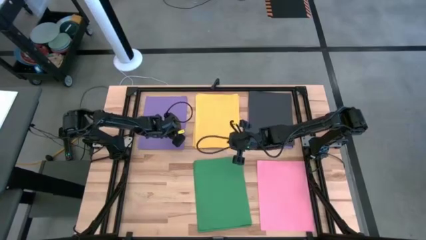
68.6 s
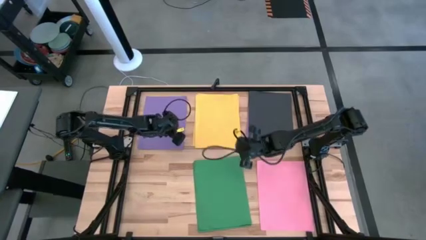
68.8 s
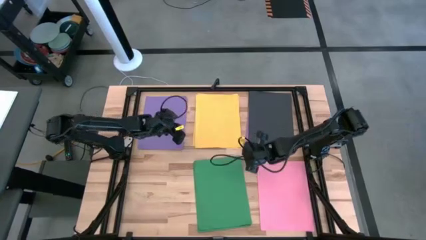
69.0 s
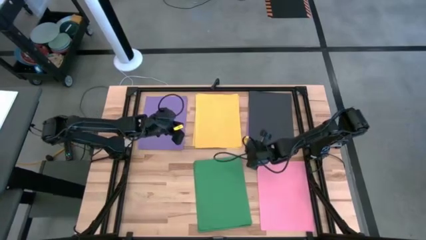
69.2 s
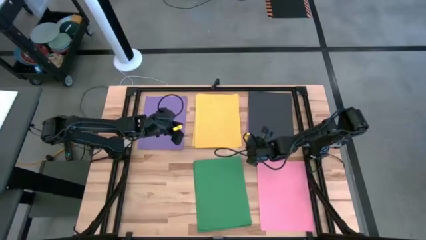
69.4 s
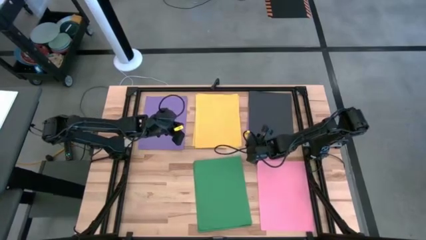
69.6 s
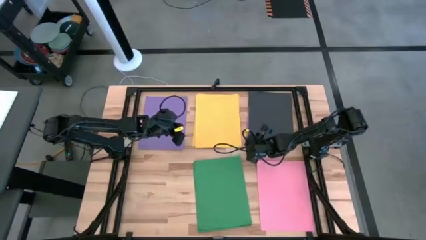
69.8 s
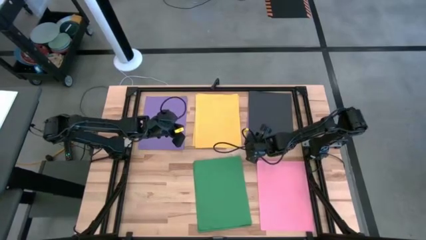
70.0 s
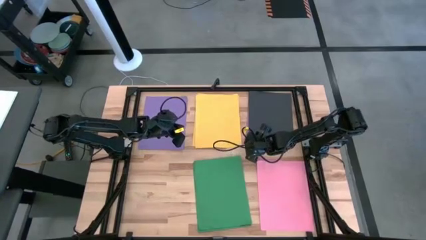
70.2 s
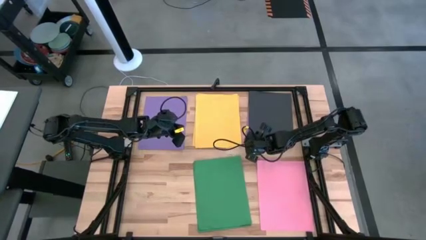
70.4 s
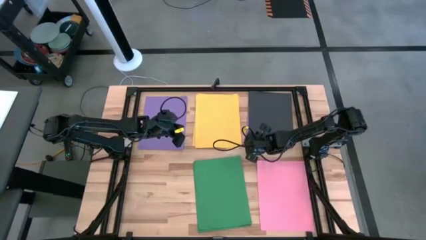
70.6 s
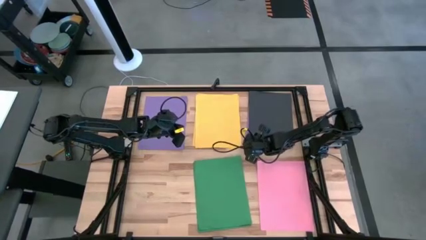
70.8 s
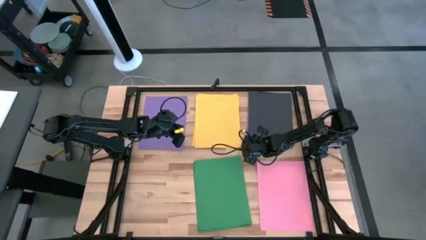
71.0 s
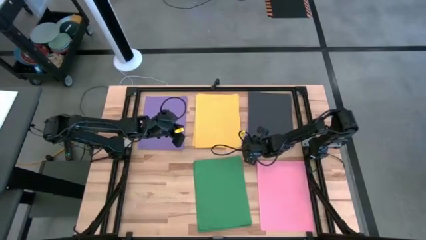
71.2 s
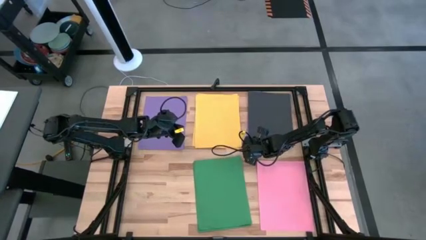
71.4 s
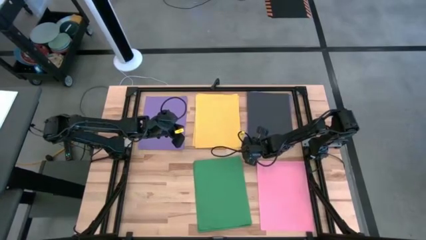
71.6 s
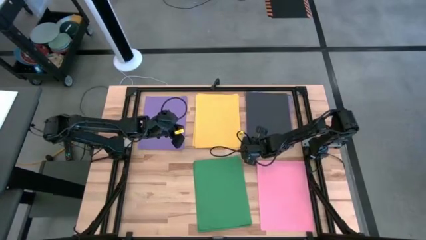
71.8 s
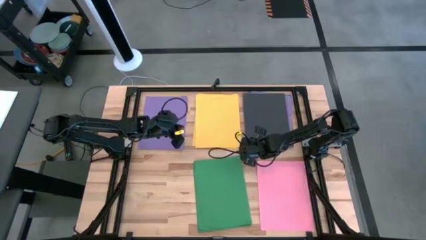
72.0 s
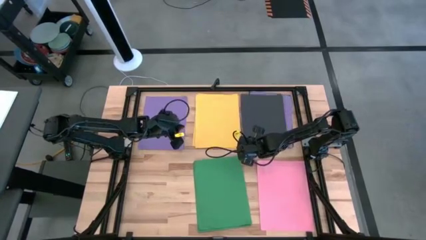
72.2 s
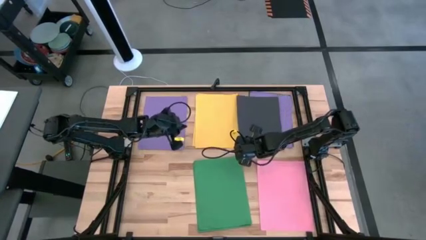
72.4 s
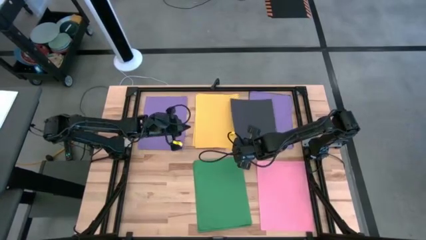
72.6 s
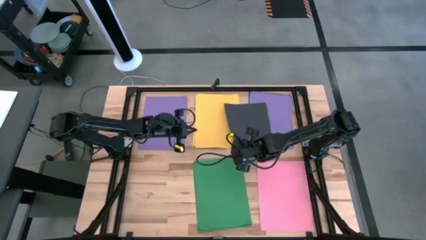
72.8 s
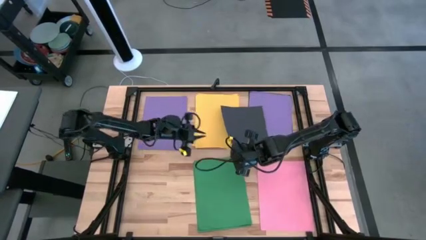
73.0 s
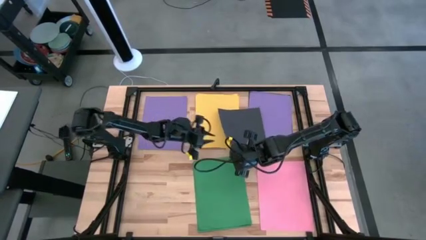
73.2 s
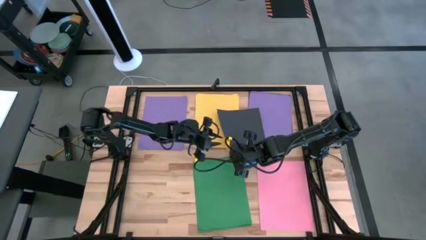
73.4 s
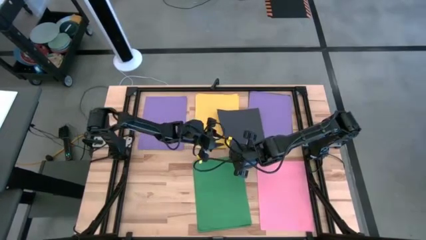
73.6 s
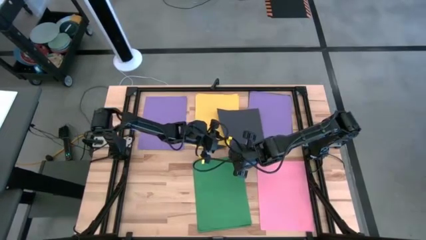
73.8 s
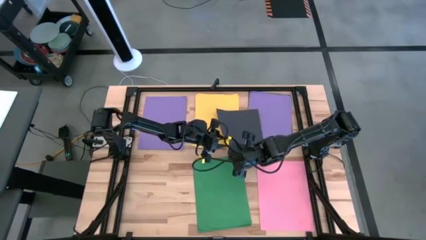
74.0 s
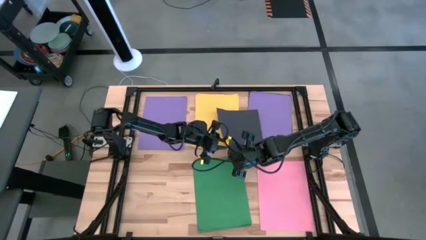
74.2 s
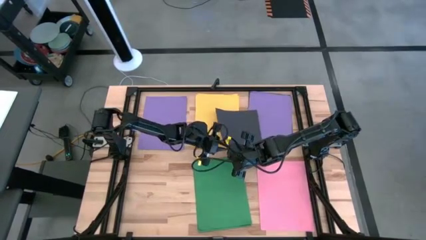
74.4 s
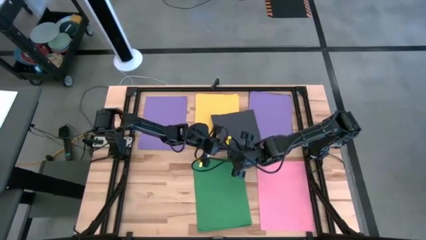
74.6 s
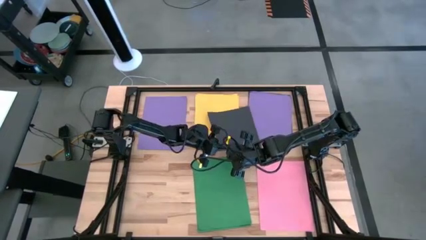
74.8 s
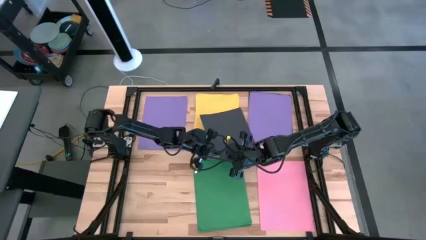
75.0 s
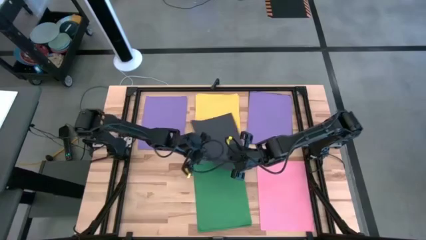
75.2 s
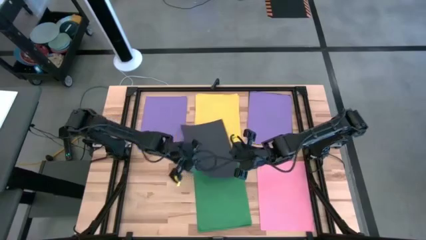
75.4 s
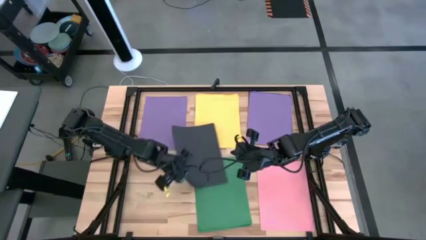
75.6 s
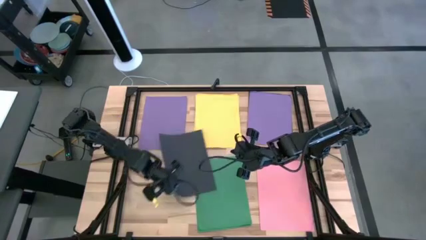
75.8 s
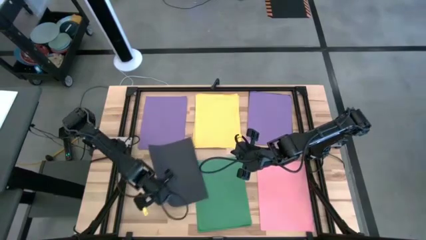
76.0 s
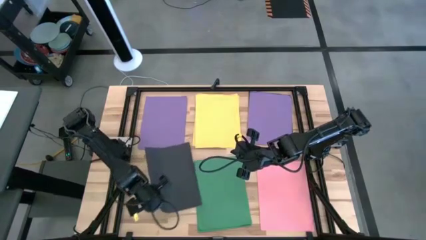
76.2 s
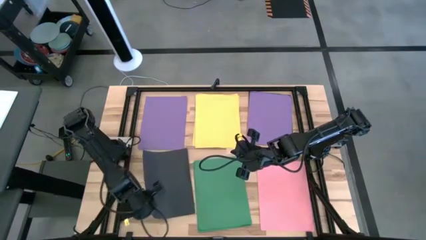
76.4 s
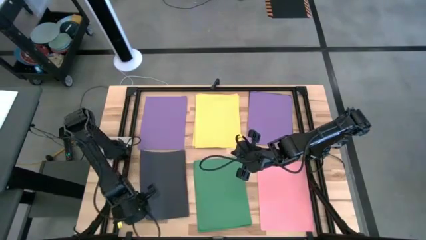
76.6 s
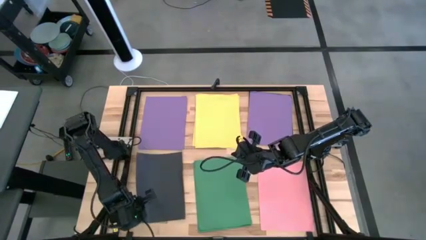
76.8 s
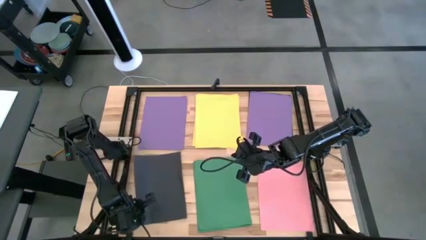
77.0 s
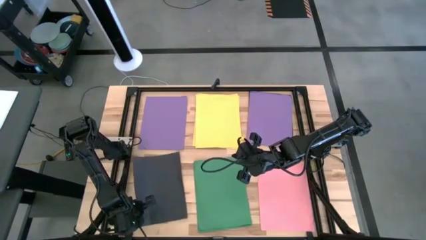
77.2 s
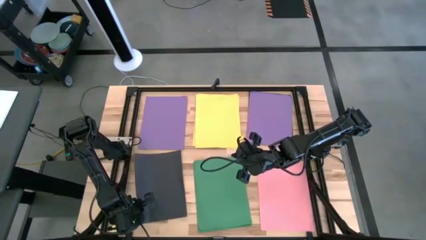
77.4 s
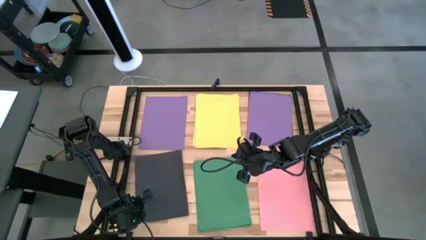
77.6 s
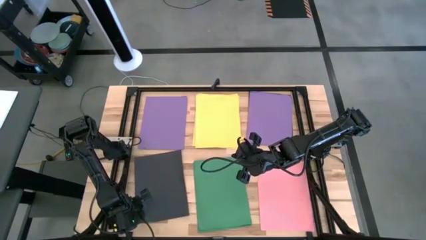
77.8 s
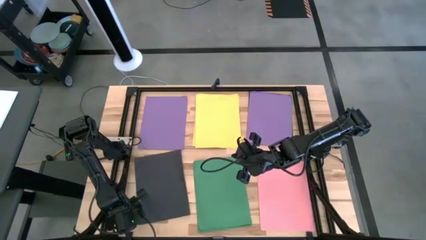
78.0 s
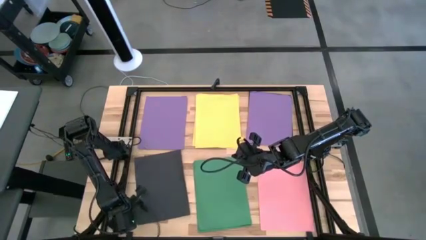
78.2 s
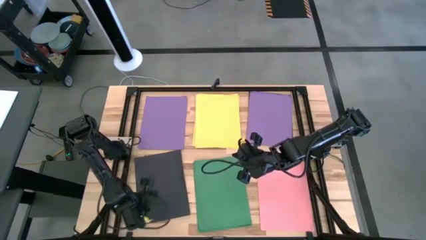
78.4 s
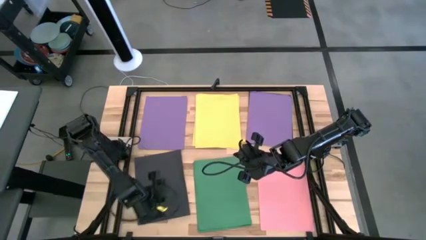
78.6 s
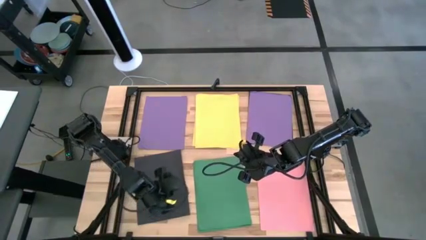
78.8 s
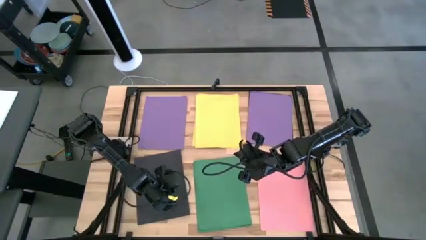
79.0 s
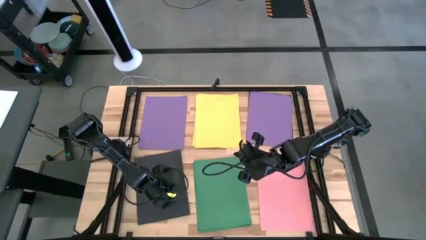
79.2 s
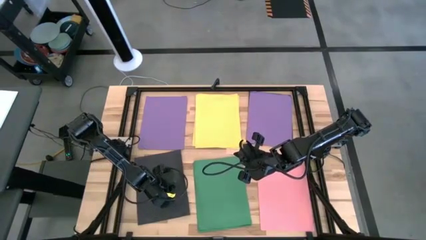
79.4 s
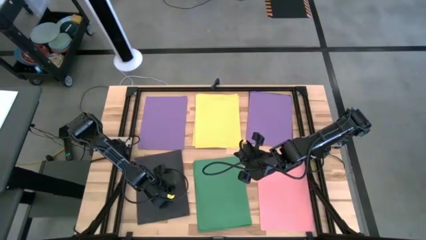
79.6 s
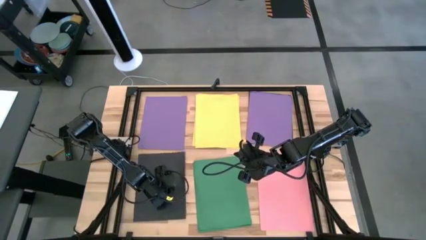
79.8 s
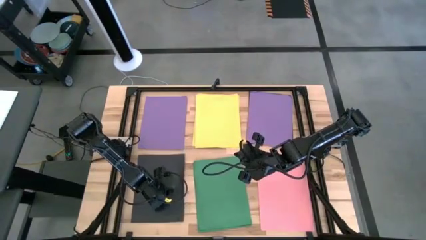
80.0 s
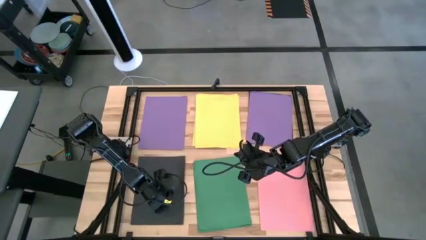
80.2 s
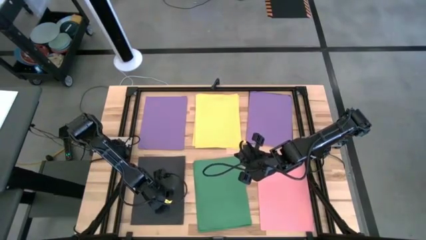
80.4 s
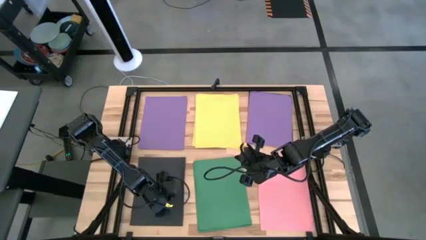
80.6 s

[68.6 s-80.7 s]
Task: Organize paper
Move the black paper to the bottom left of the table

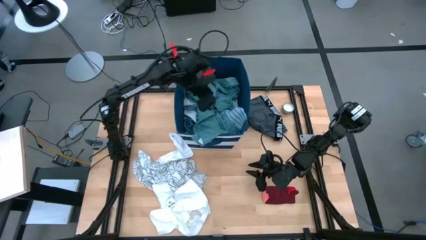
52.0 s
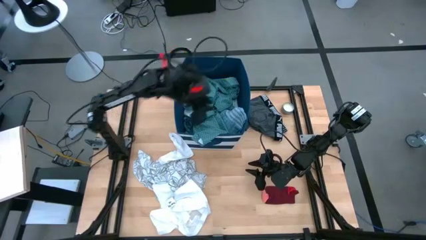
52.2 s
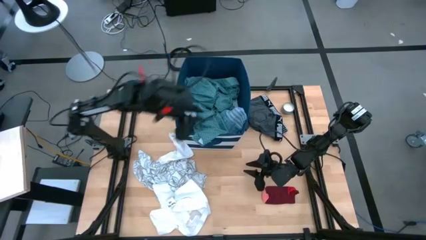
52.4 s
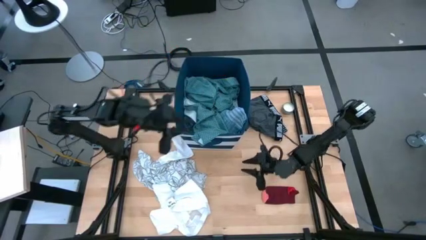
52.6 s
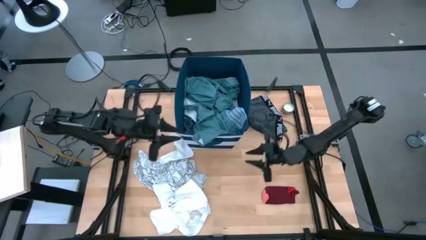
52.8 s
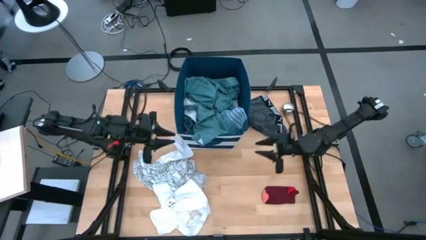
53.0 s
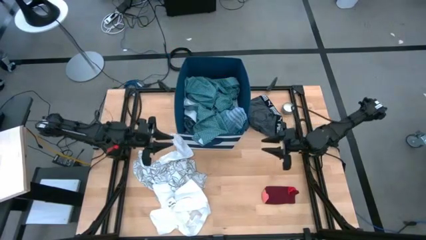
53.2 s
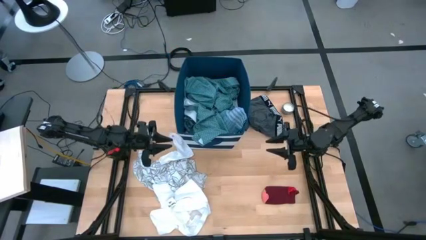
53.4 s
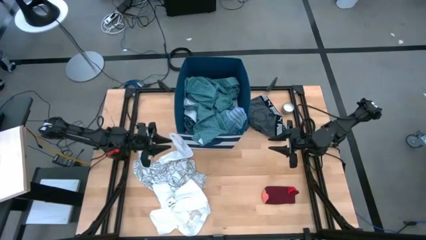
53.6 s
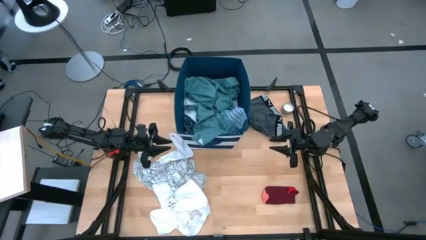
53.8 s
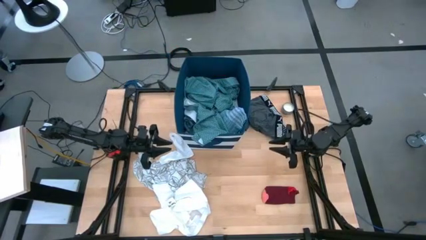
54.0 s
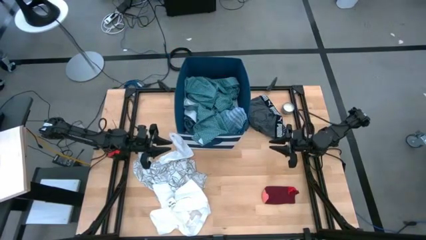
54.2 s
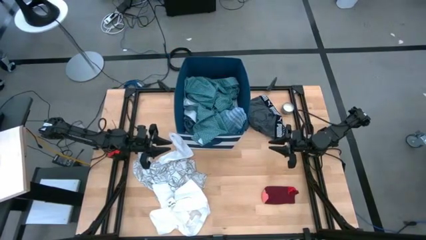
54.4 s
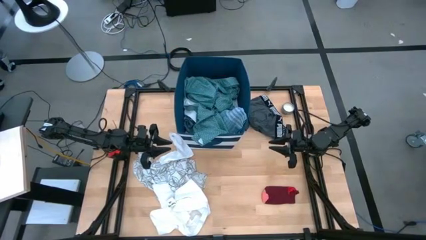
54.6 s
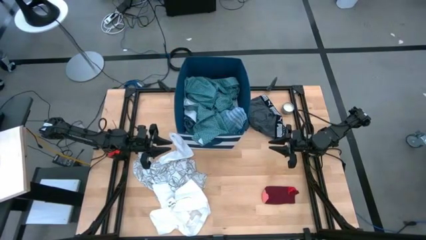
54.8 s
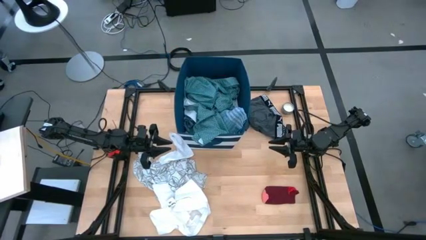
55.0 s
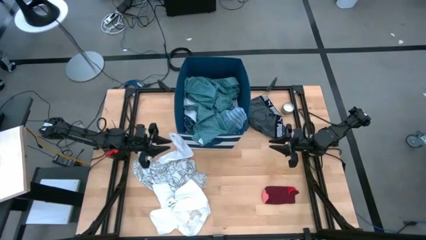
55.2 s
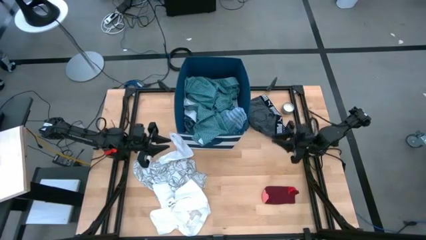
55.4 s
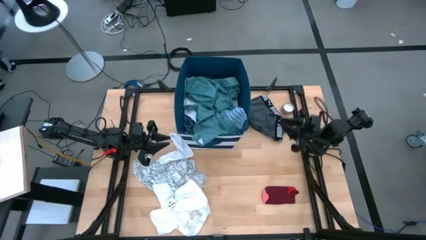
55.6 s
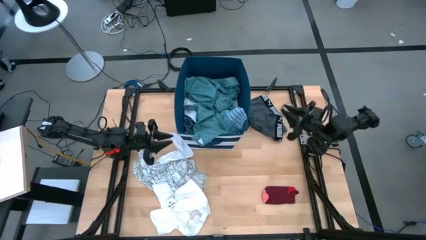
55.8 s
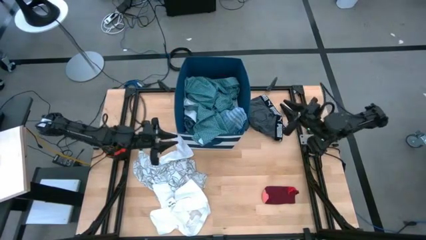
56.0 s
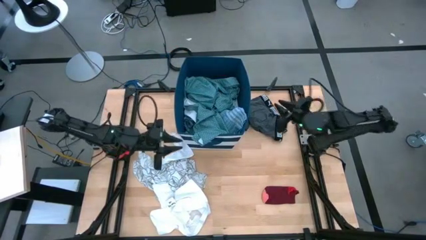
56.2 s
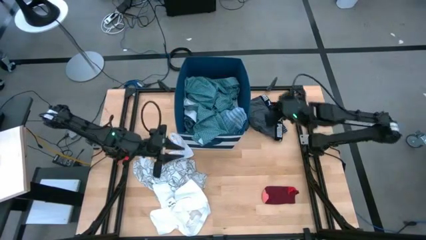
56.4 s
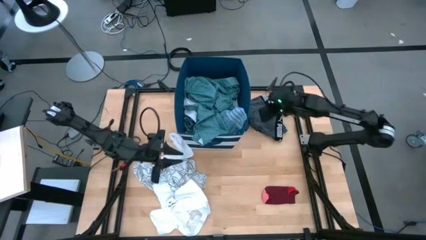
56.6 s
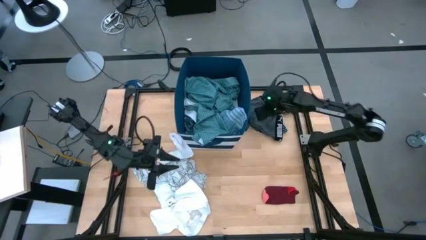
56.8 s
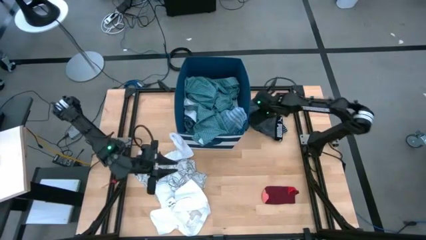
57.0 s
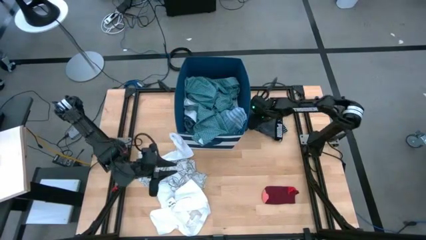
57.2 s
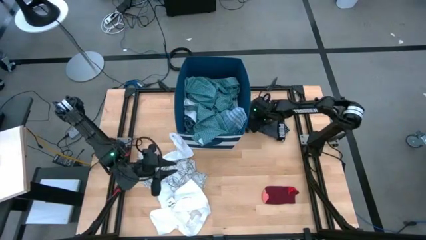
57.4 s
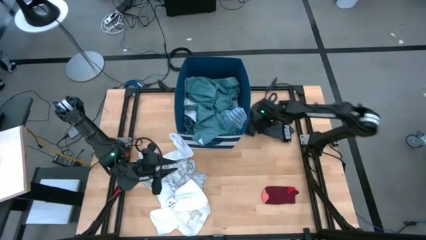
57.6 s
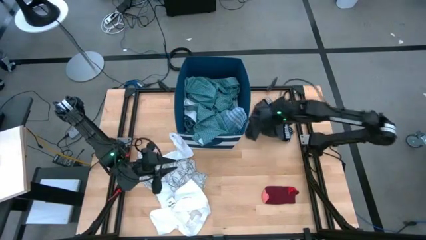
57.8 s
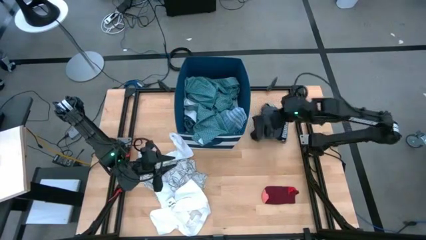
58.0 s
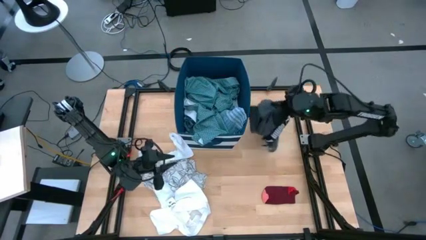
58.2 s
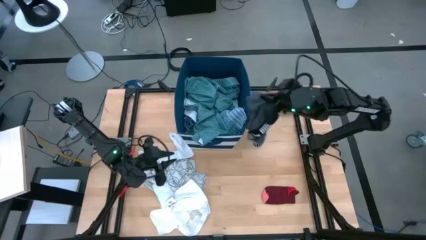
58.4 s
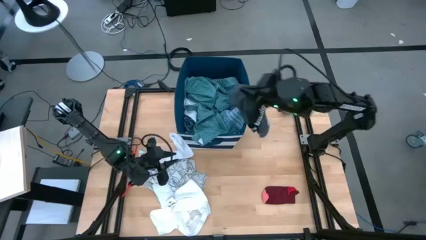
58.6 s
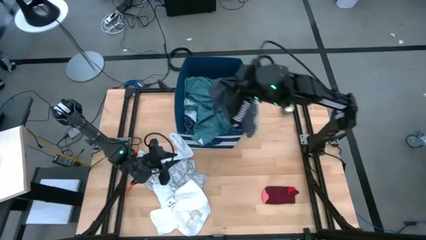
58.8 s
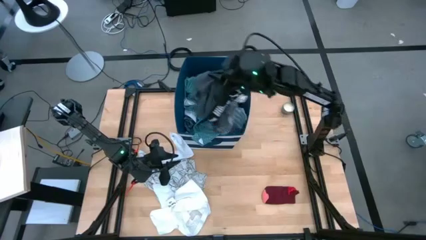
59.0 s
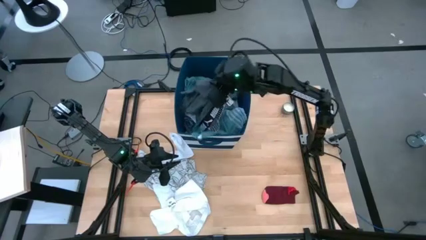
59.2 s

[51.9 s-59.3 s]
Task: Sort clothes
Put the grey boxer into the blue bin
